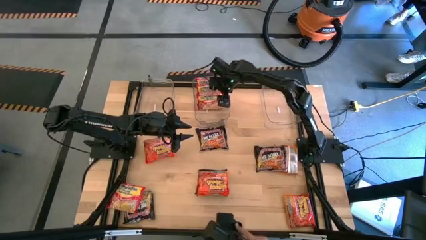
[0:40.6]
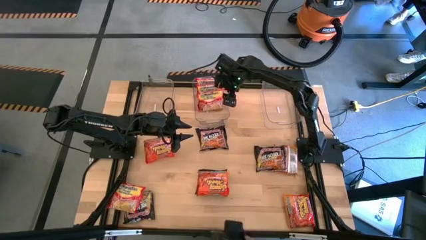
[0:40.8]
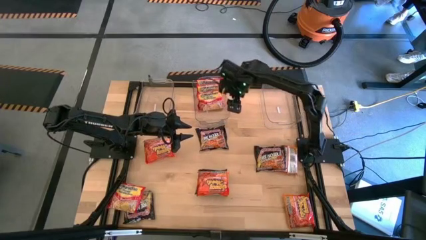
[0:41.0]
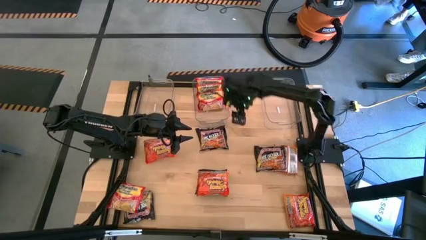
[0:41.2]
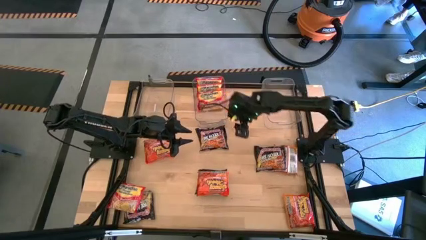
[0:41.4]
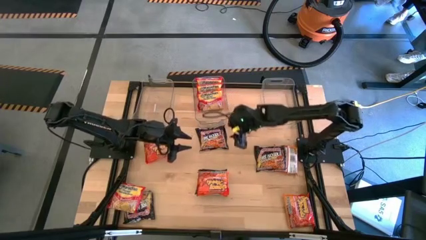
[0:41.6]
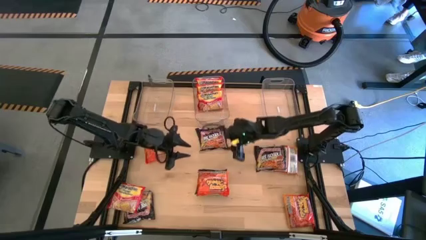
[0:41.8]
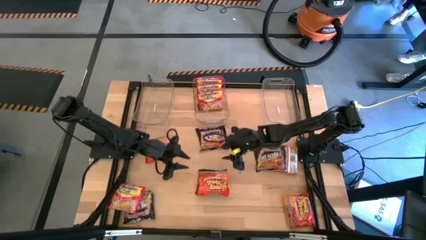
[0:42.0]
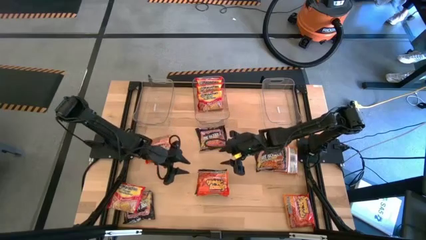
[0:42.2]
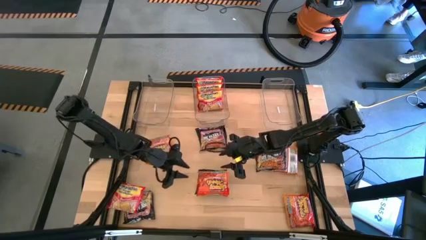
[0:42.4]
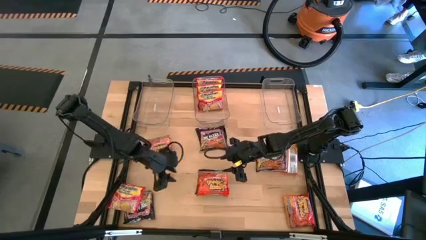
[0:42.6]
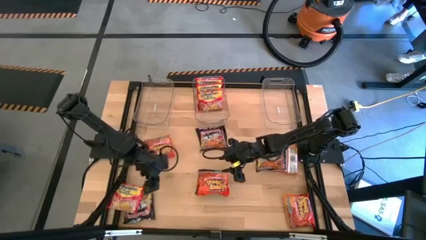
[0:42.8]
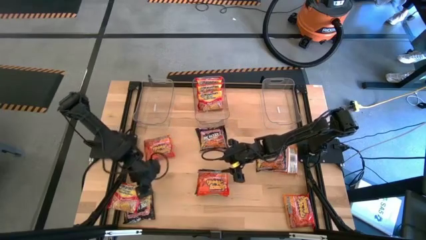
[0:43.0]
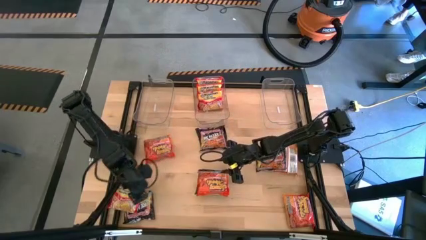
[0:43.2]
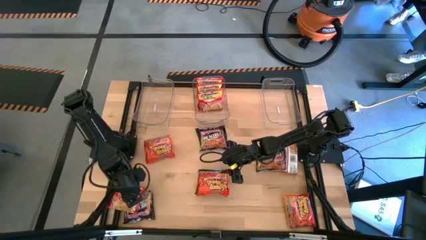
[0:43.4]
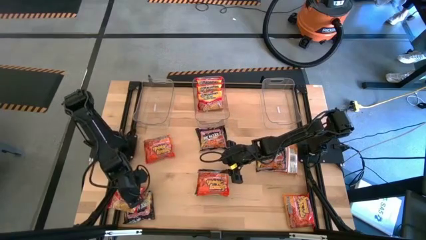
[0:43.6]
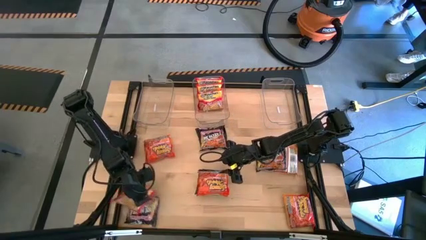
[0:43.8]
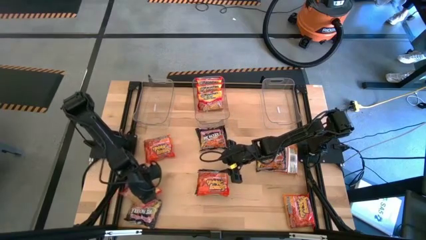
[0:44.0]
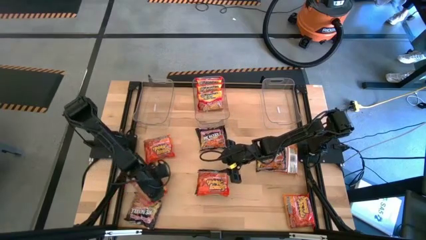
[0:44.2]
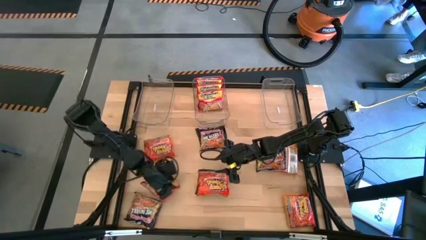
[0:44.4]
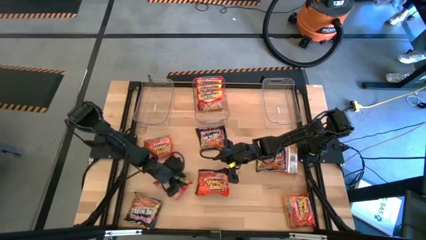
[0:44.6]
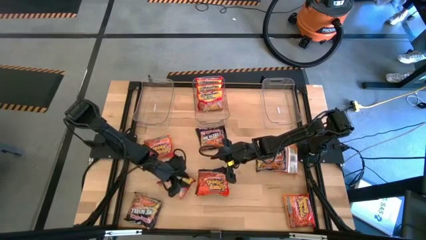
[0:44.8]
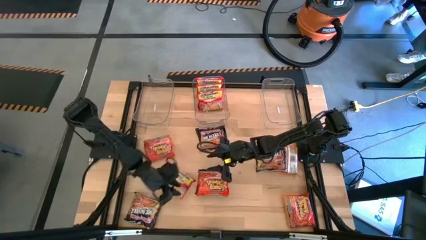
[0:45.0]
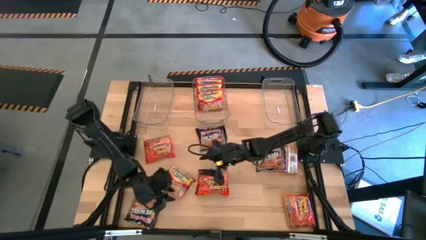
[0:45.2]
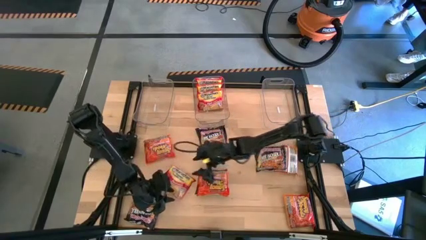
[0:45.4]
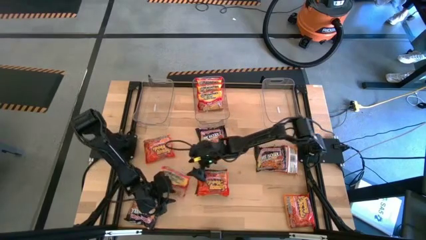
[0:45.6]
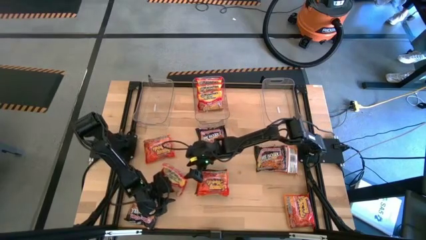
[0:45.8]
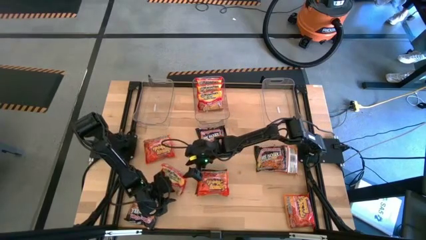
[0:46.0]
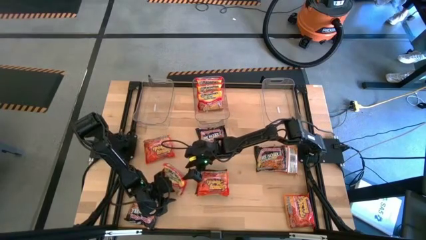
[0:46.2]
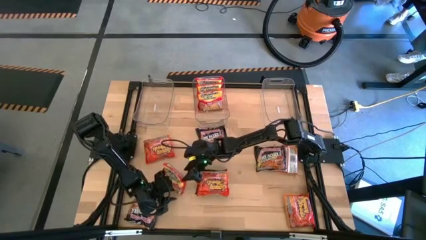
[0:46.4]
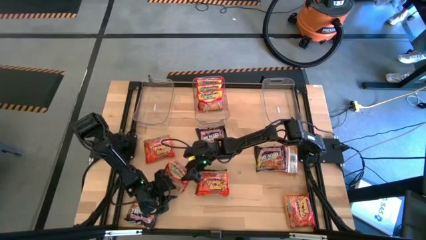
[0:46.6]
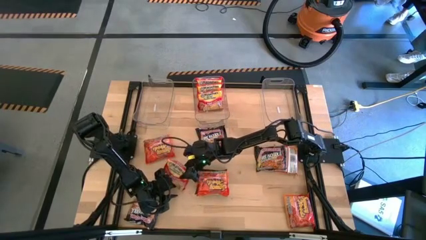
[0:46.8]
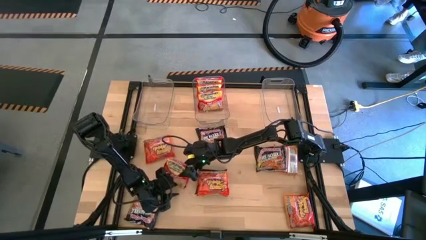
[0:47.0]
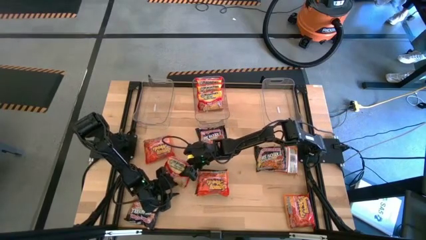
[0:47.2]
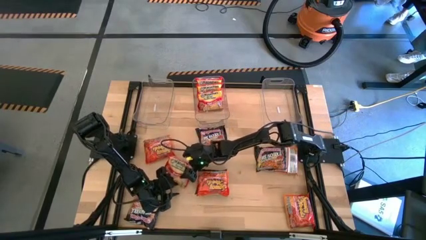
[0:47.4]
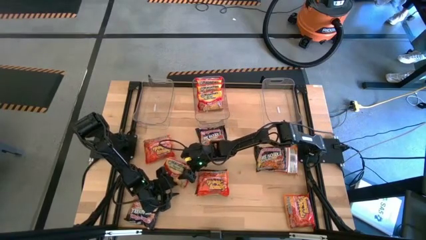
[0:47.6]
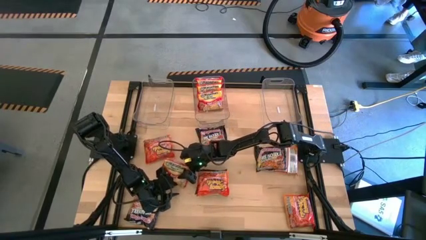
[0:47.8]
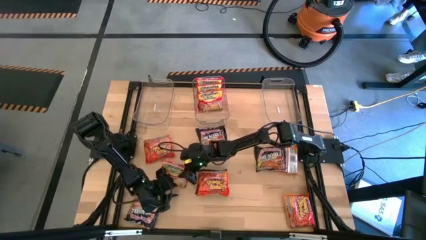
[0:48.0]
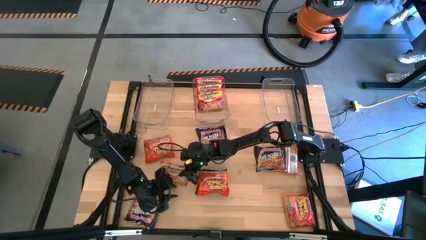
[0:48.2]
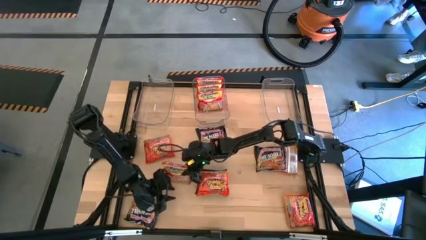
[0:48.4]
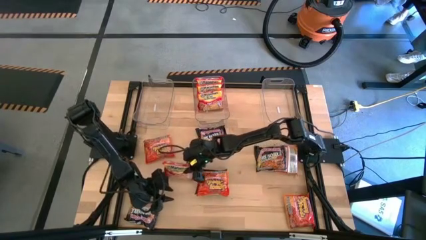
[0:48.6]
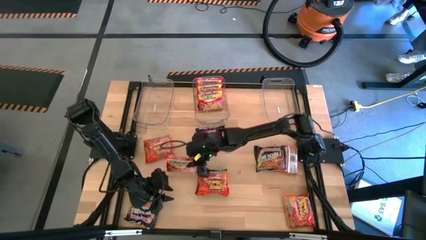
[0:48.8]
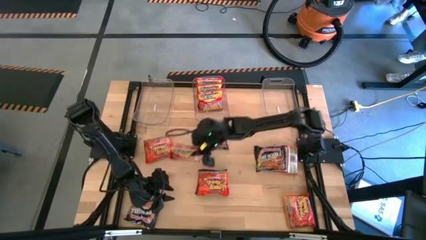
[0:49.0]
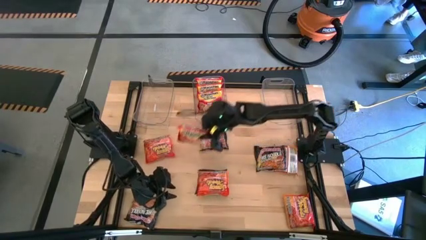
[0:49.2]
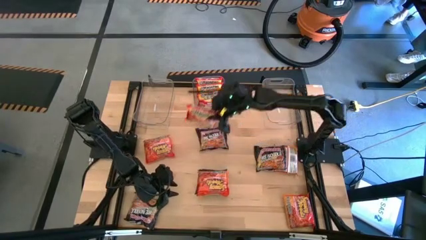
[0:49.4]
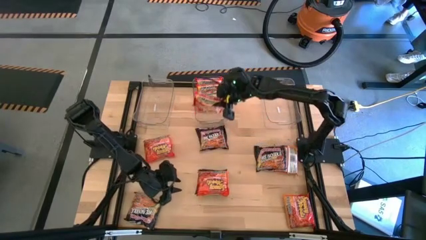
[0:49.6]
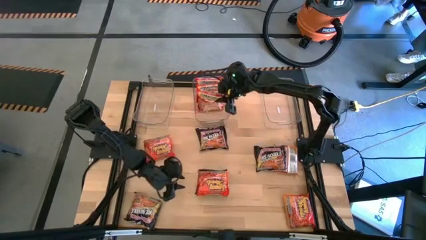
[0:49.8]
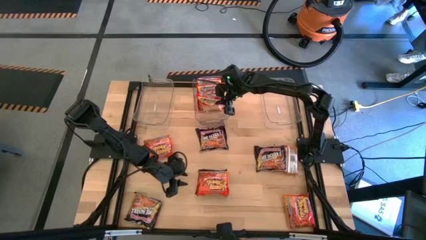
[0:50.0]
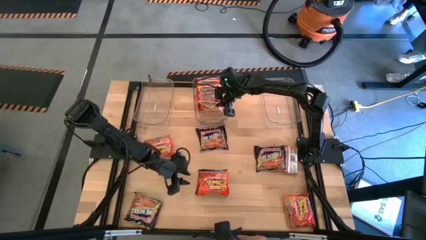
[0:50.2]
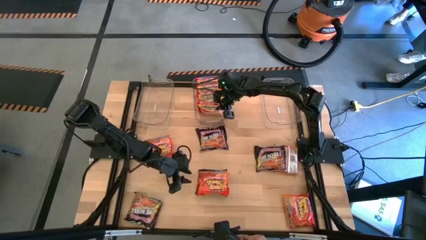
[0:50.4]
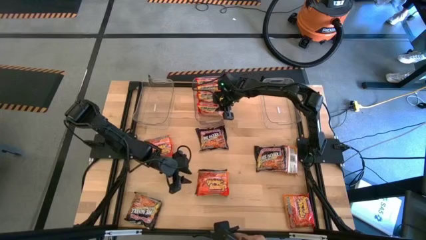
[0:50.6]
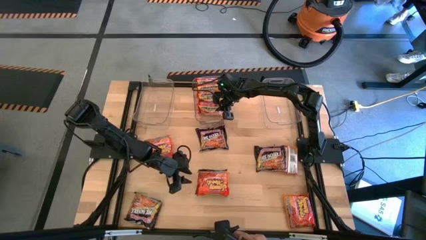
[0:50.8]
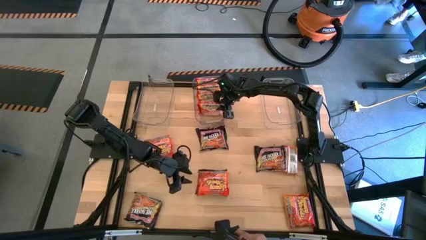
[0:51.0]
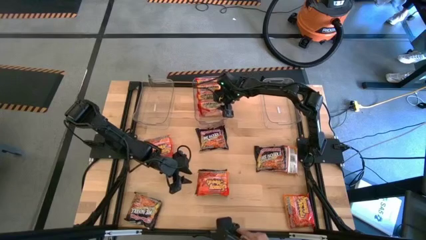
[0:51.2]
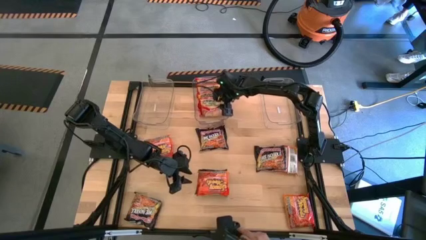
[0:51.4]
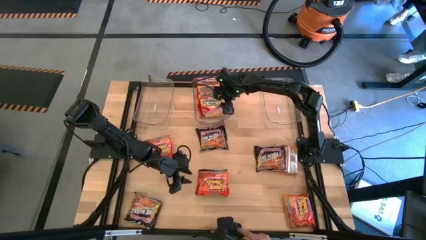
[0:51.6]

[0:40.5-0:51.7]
Task: Sort Maruchan noodles
Put the red noodle pack into the middle transparent bin

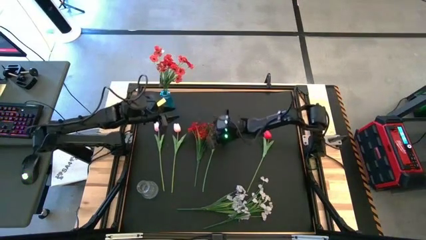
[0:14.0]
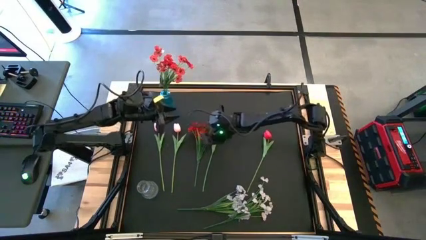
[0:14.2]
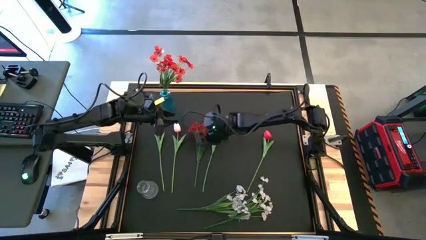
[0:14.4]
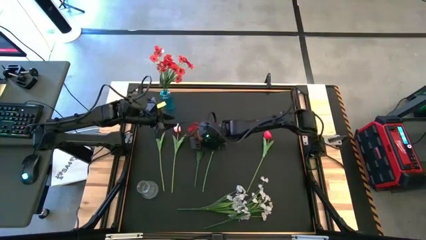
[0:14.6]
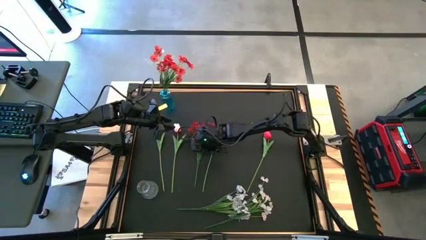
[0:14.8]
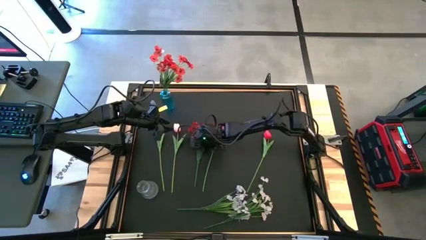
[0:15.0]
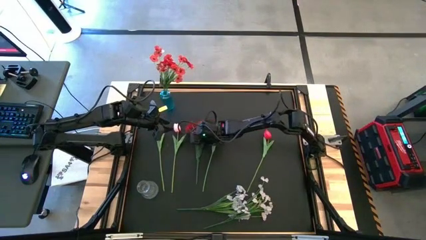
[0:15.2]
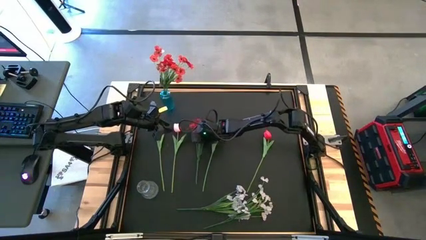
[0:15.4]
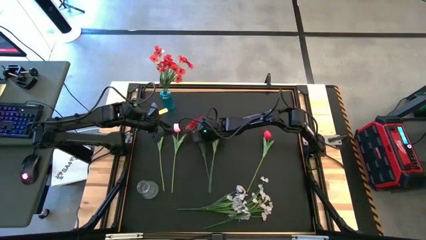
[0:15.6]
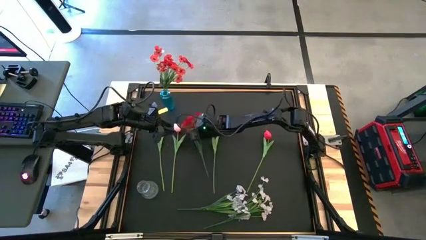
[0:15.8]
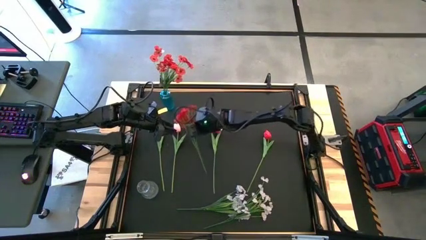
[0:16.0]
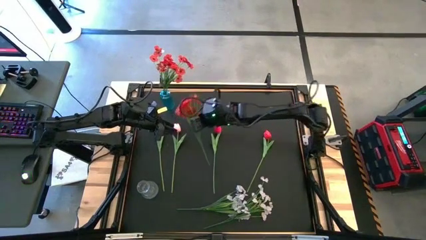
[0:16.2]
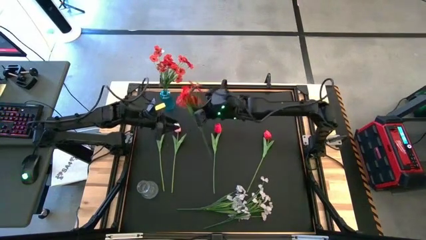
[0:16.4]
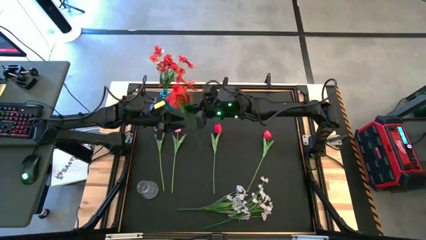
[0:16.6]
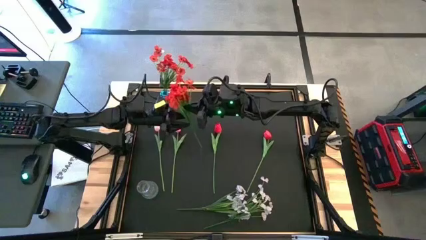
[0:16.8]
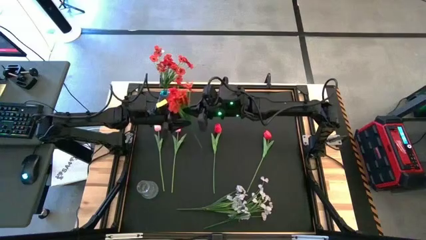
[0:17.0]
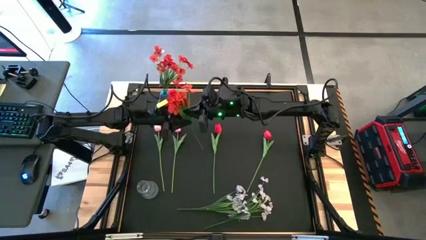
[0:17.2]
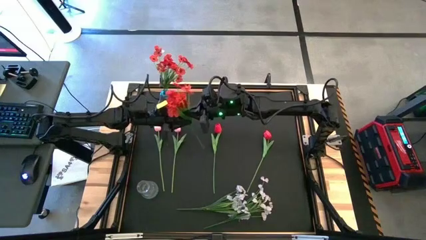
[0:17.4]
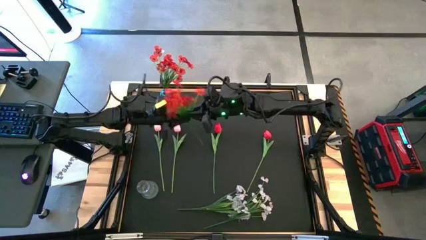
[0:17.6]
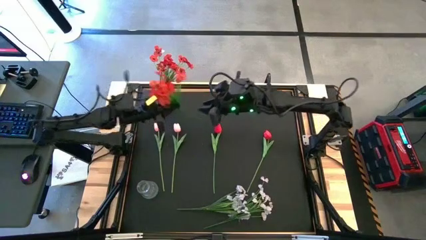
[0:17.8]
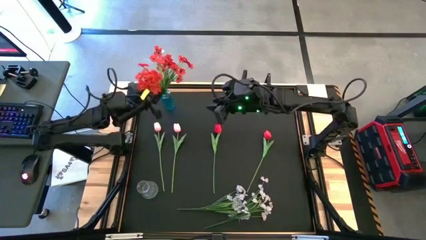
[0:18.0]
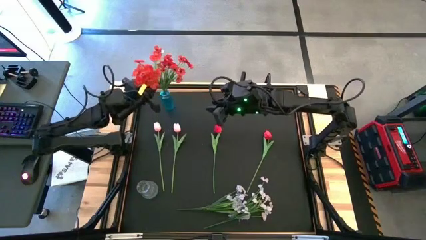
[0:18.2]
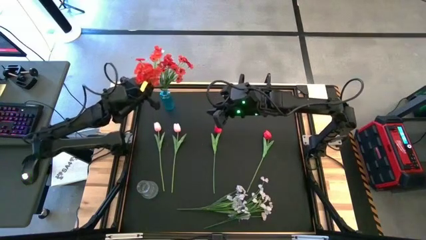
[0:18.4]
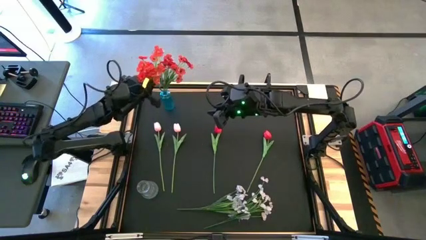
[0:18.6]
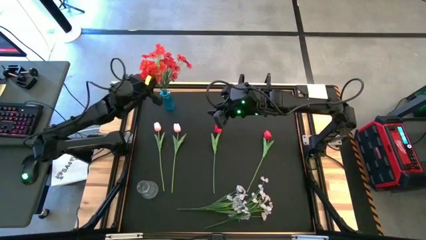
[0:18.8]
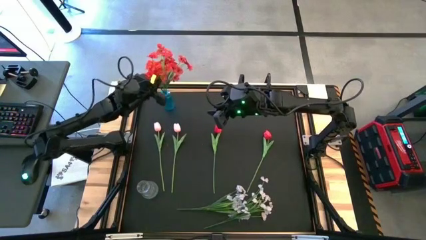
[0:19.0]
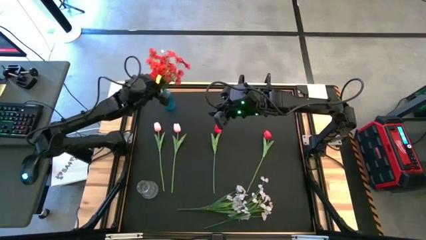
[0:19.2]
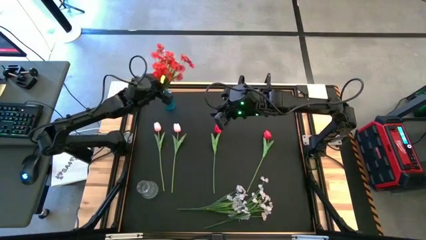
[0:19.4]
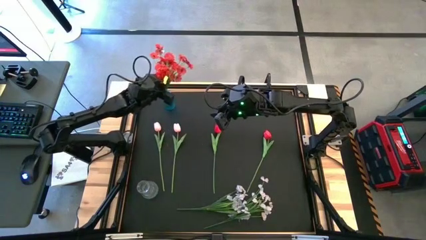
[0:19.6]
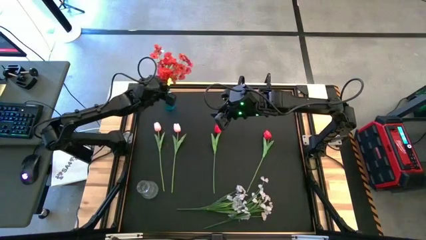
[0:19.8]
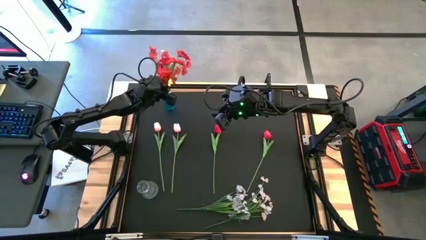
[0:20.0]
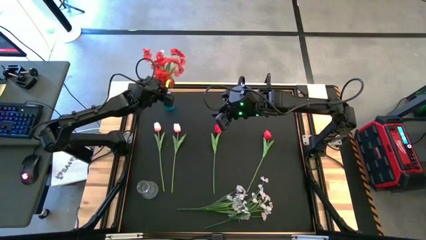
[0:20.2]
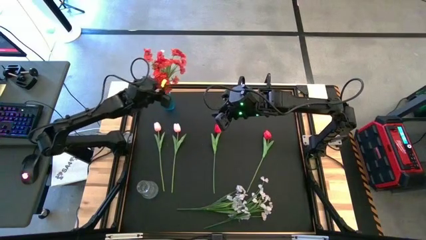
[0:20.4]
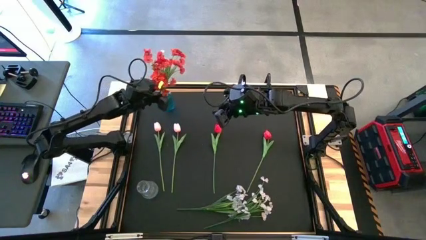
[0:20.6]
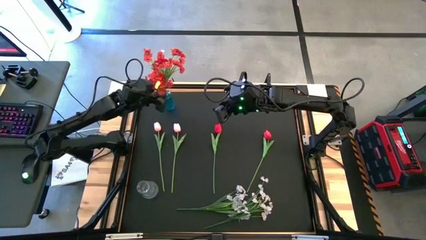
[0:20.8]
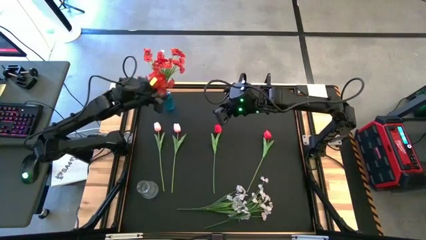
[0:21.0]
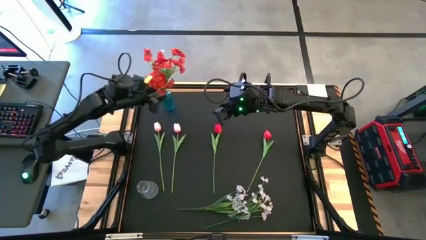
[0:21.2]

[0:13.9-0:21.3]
Task: Sort flowers into vase by color
Put the red flowers into the blue vase
